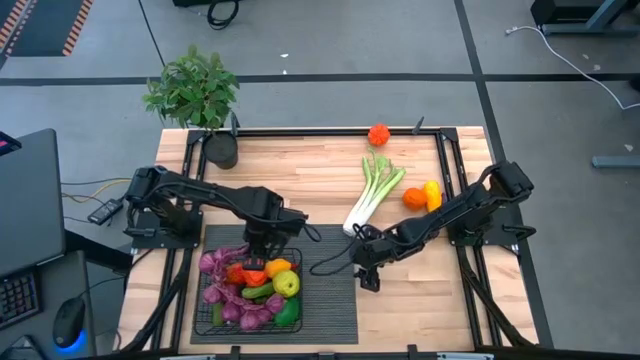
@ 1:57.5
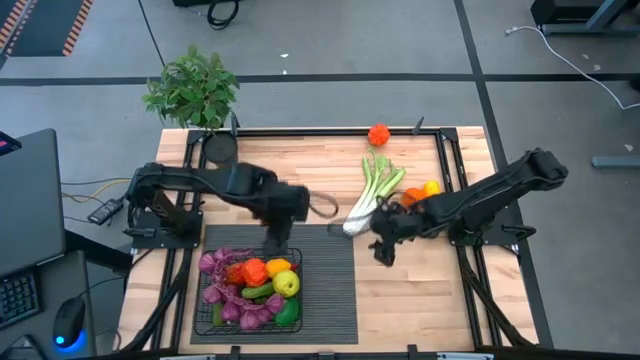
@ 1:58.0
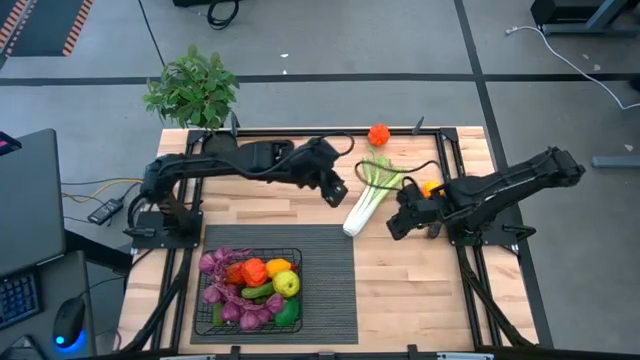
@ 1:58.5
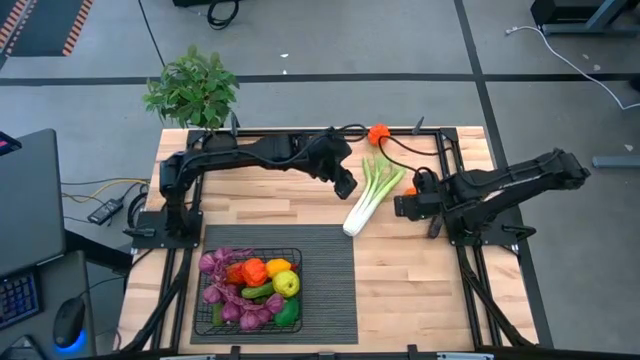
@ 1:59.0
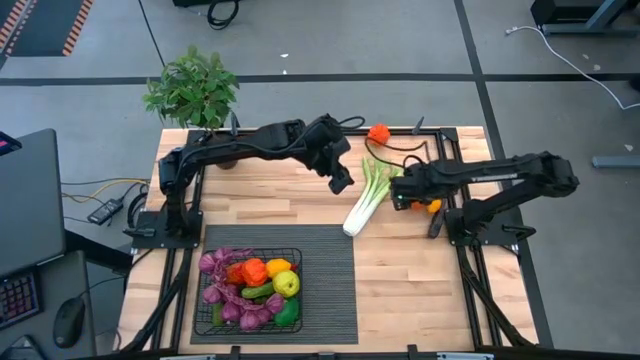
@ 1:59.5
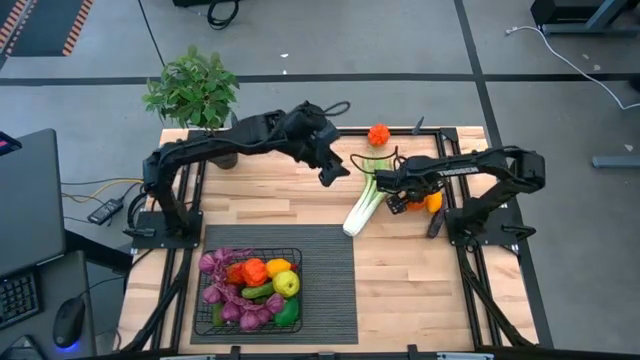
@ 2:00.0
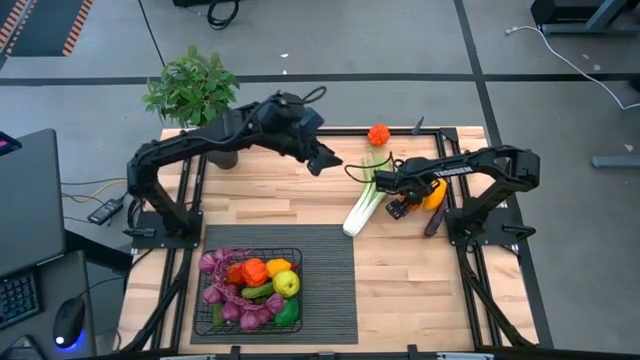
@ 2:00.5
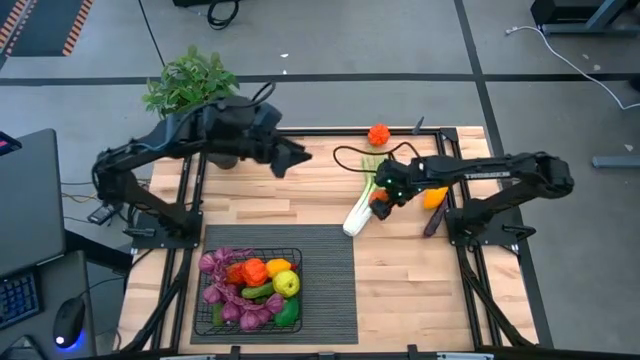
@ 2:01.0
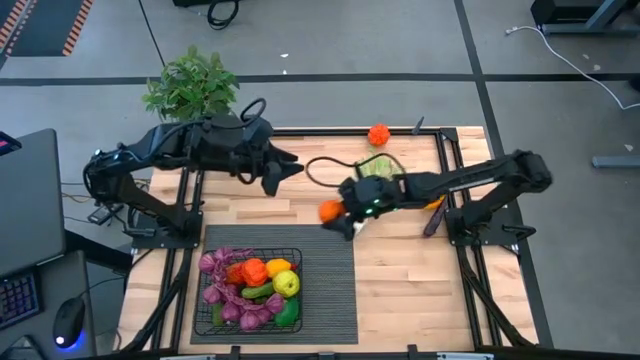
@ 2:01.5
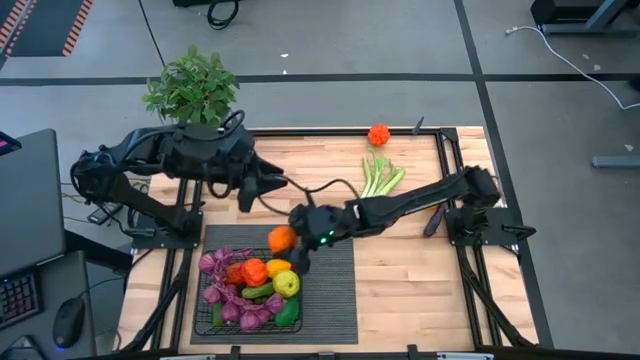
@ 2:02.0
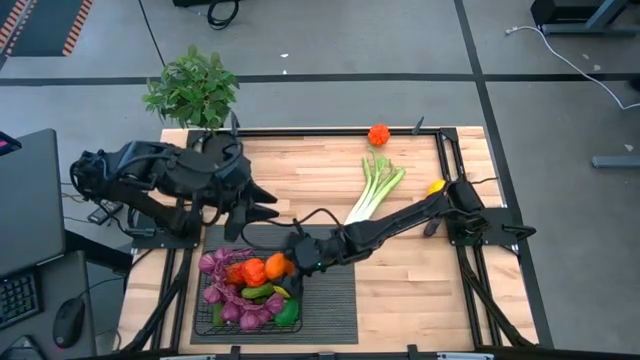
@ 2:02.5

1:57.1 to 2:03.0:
Task: Build produce basket
Put the orange into the wire basket

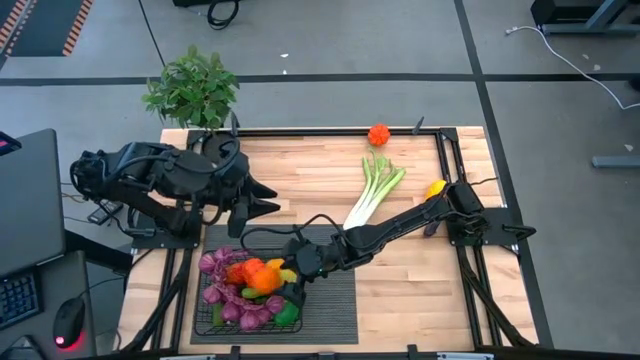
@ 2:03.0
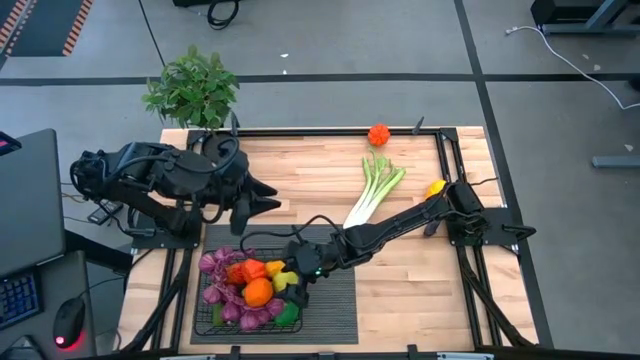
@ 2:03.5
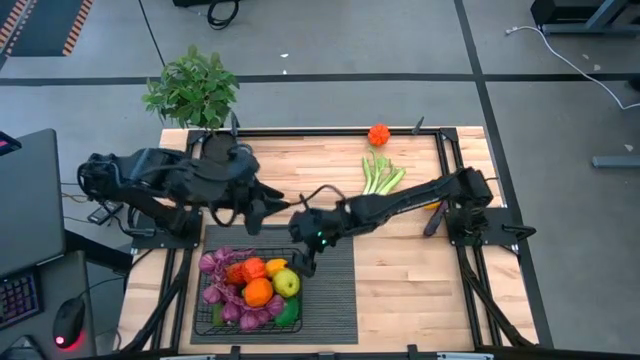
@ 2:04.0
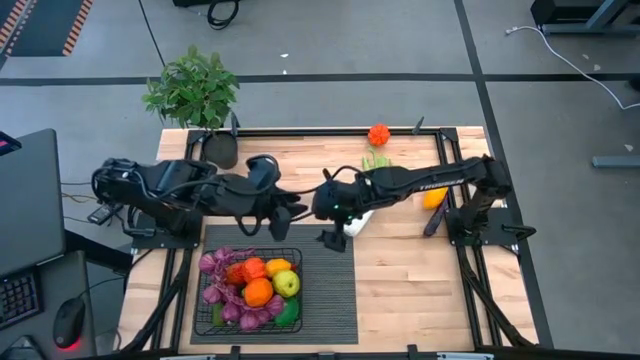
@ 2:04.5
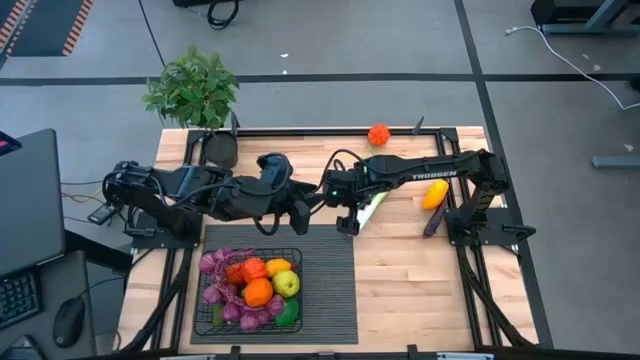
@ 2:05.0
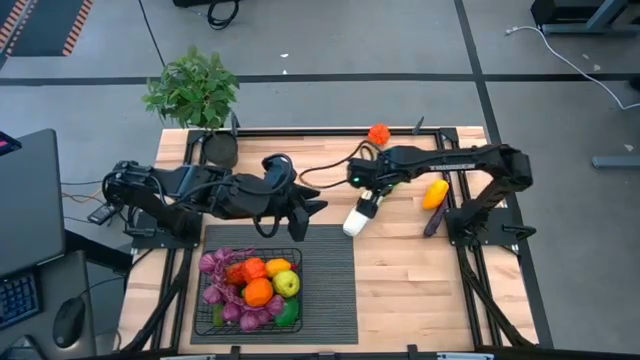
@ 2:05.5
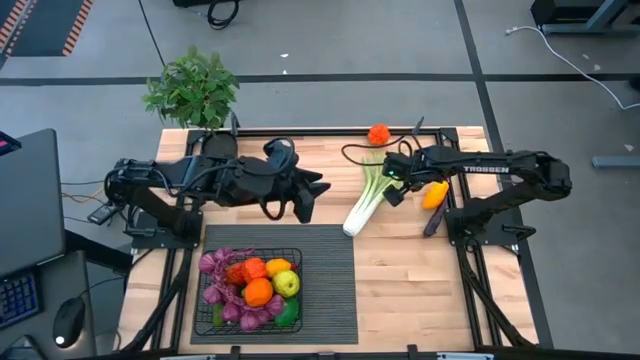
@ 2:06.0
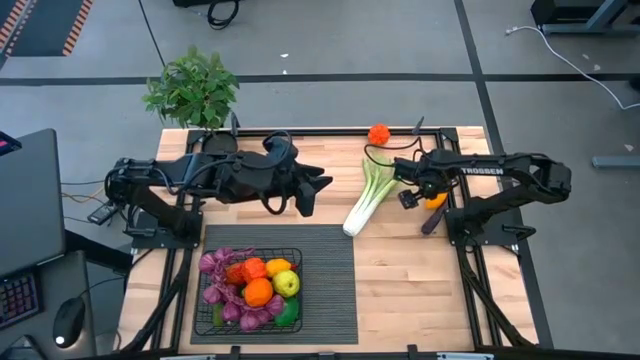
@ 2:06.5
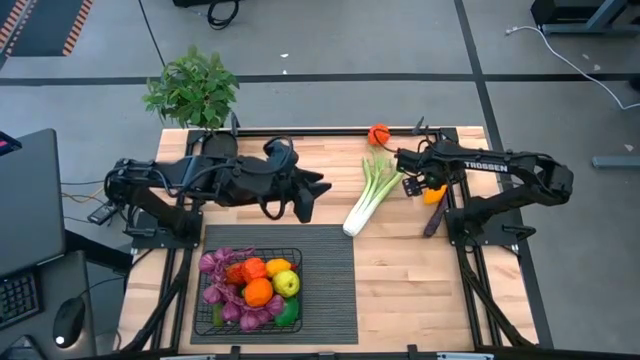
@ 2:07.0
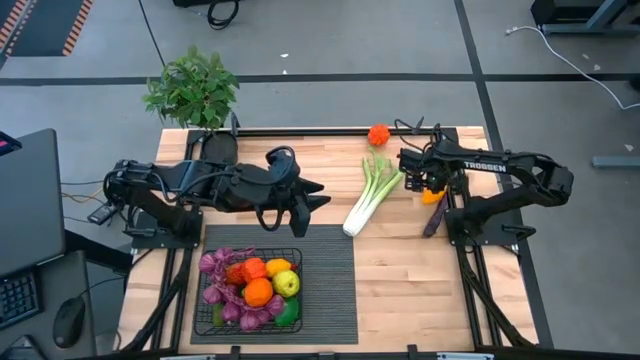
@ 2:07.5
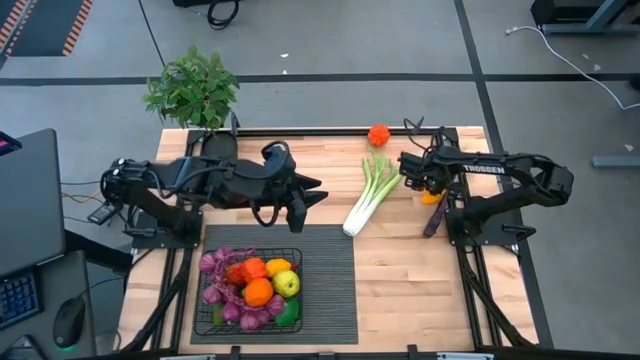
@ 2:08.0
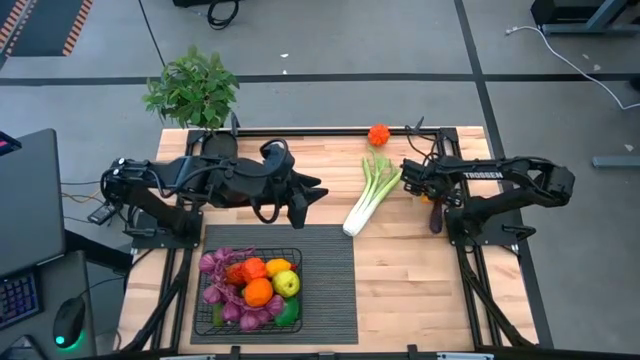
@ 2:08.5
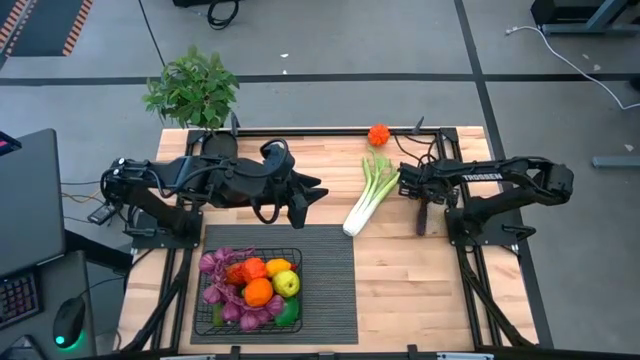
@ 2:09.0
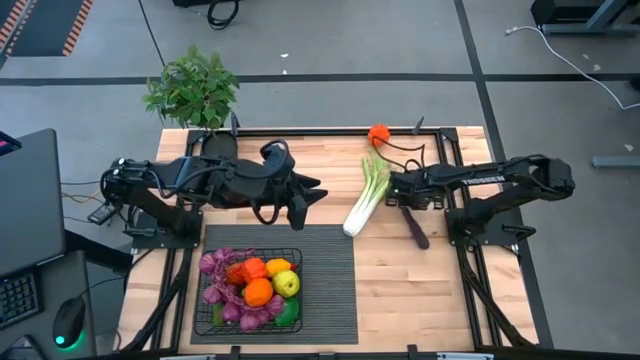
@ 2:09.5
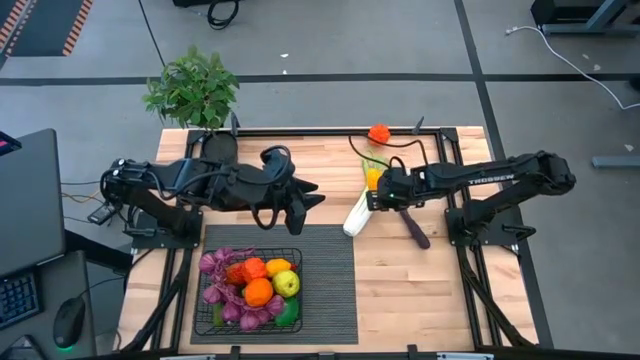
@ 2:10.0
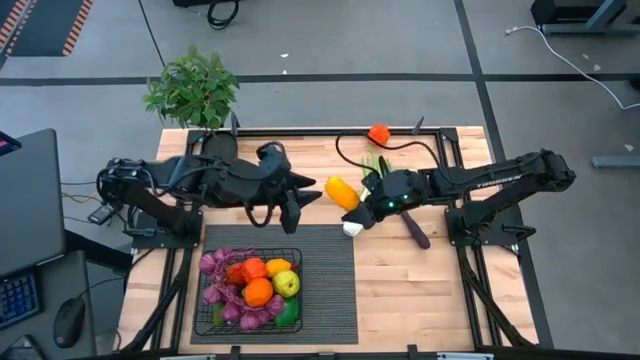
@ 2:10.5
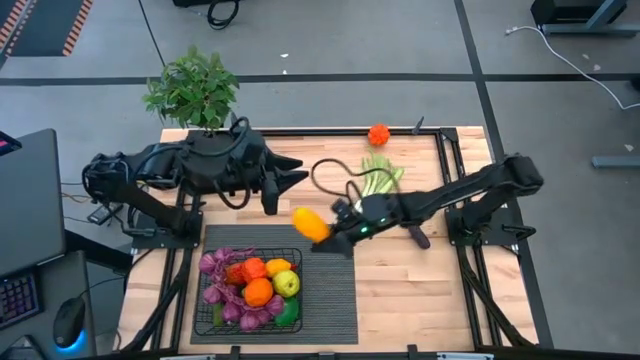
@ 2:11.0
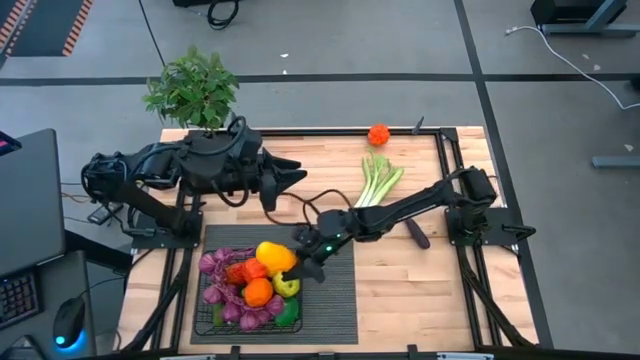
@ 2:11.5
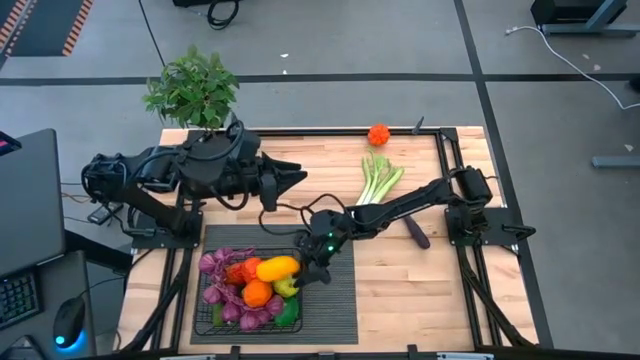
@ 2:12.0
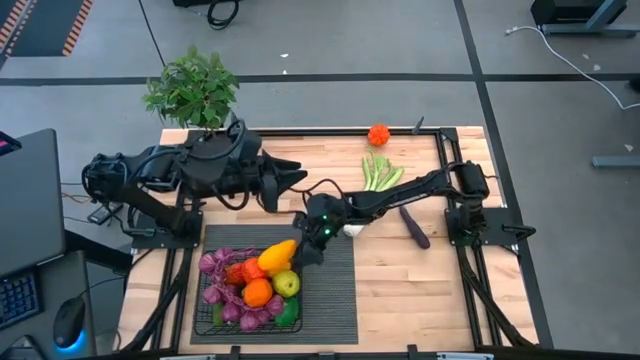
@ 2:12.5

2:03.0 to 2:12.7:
Put the yellow mango into the wire basket

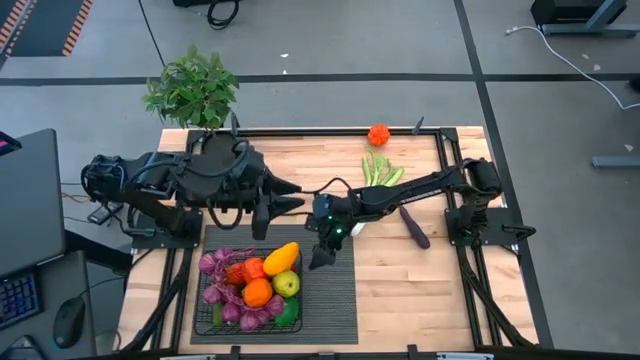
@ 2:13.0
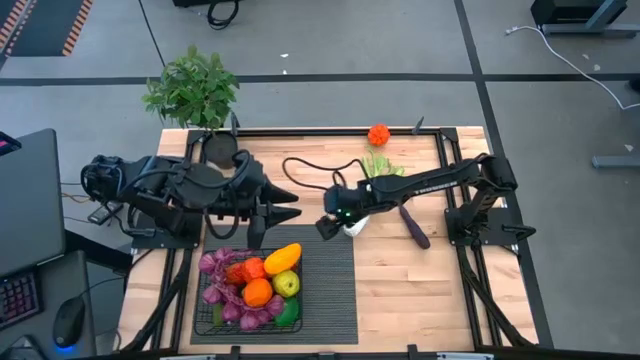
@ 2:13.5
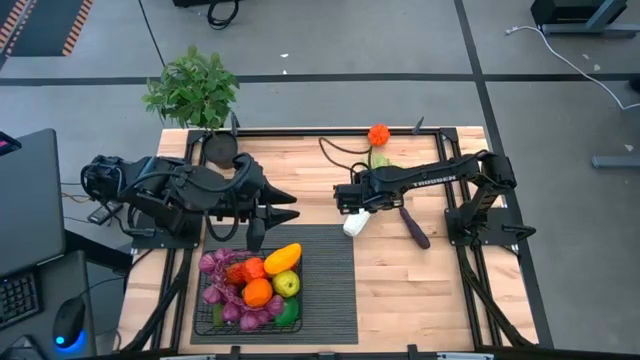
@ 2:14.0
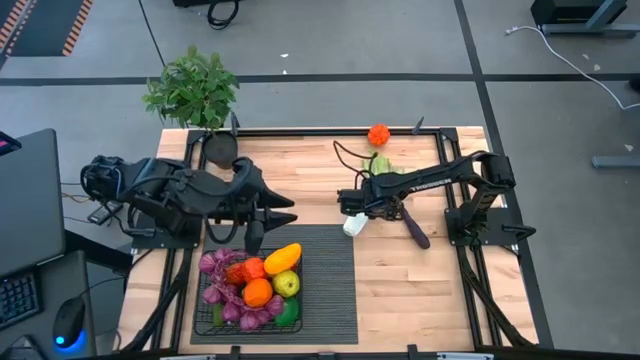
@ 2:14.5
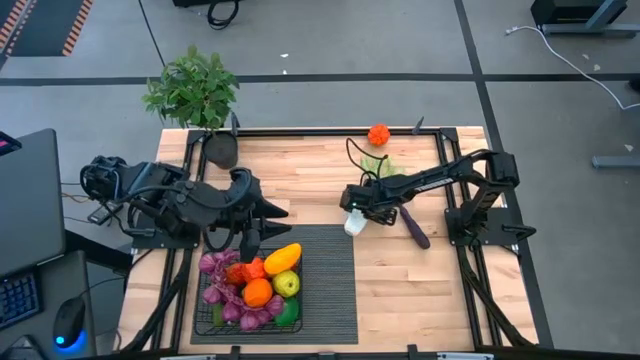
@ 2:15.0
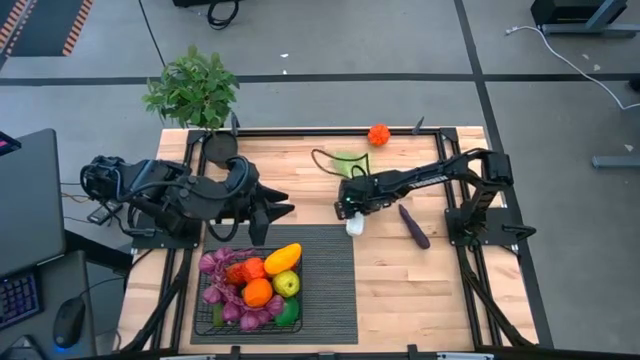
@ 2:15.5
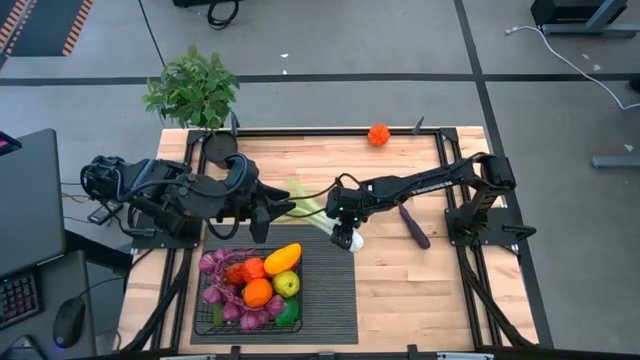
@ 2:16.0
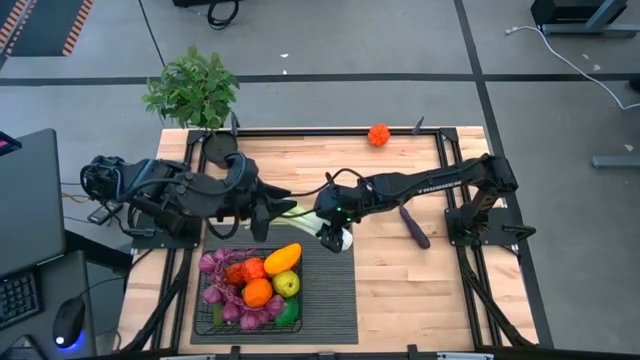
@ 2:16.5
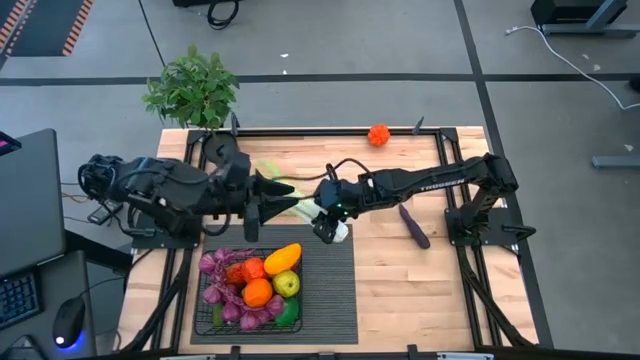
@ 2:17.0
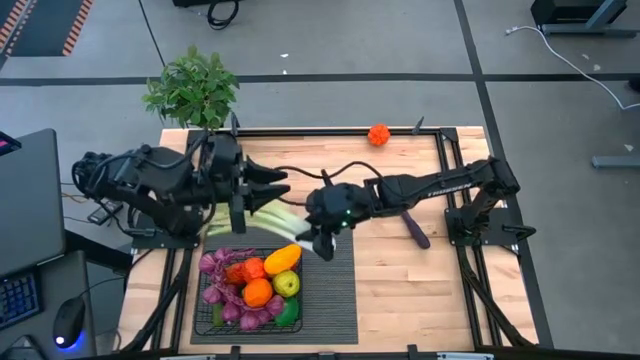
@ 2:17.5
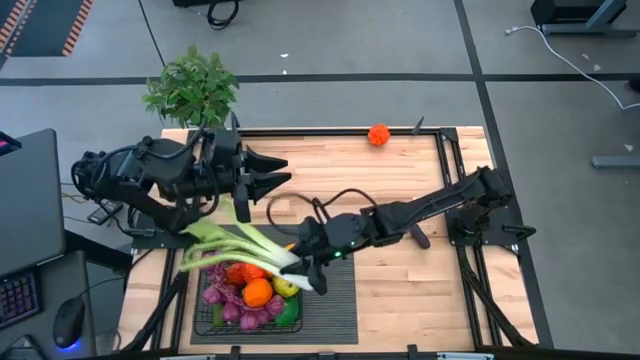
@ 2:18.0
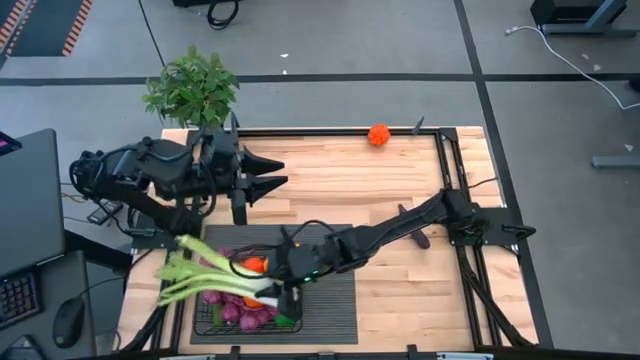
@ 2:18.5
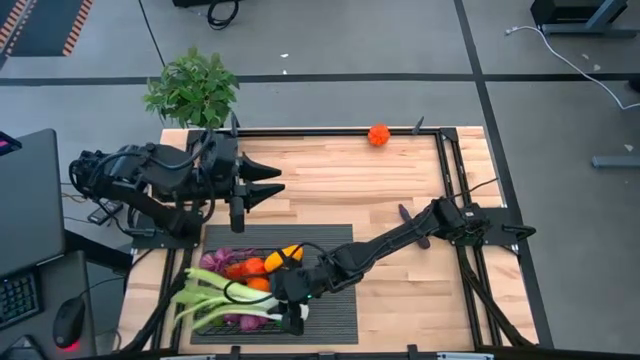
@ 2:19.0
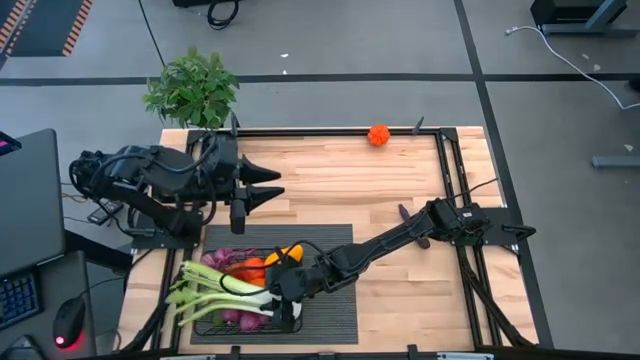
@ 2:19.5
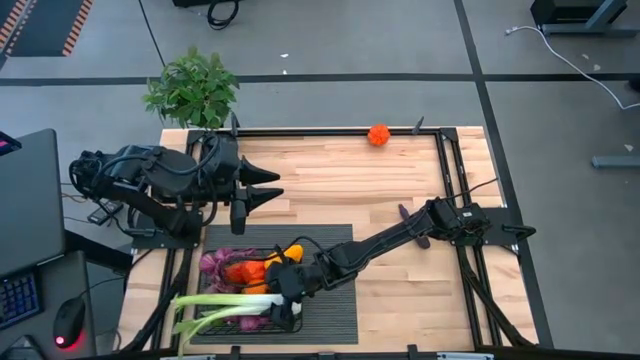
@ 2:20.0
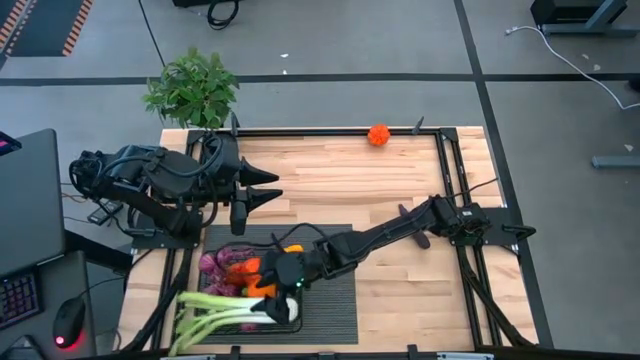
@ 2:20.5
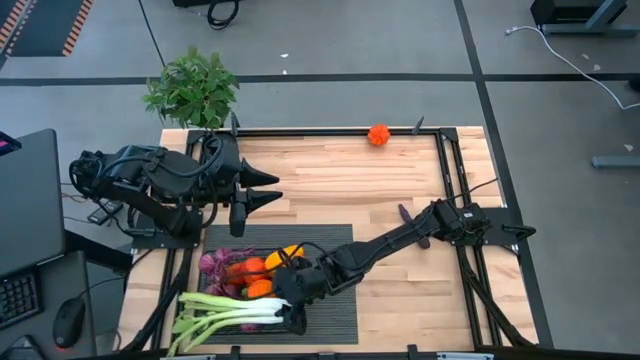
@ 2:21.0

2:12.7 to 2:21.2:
Put the green celery into the wire basket
